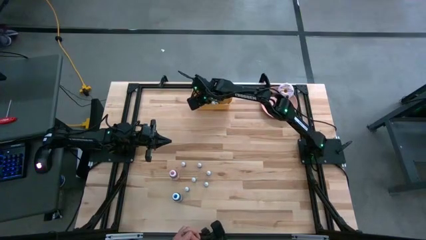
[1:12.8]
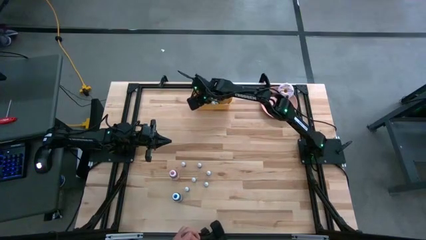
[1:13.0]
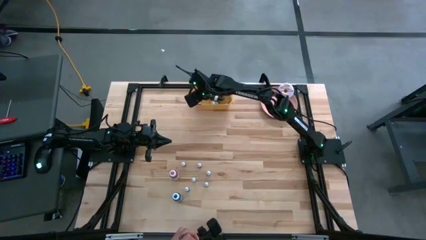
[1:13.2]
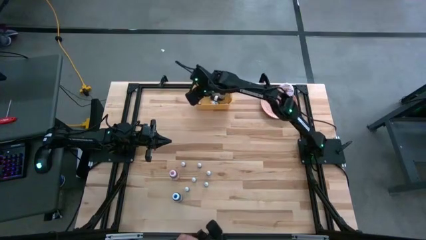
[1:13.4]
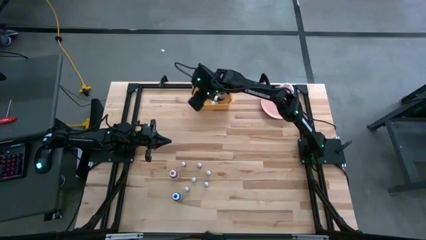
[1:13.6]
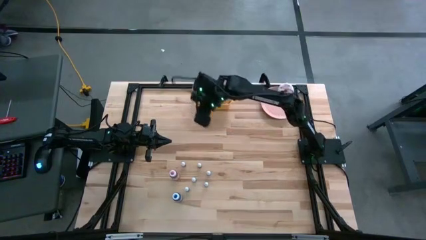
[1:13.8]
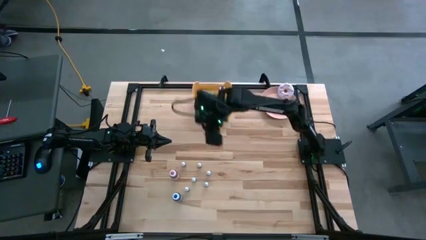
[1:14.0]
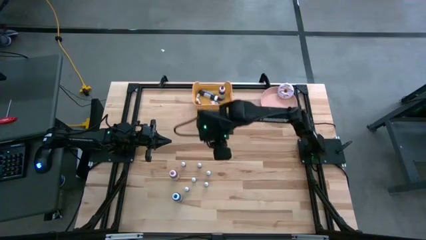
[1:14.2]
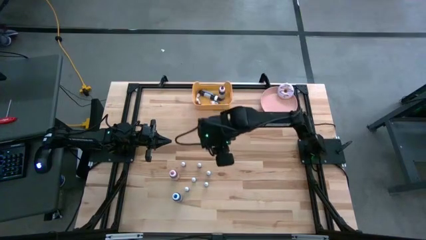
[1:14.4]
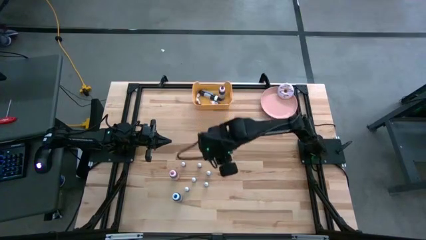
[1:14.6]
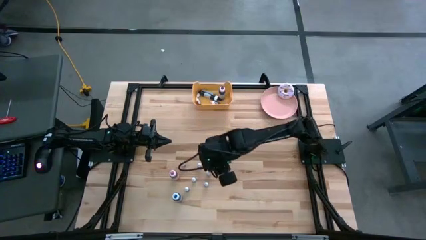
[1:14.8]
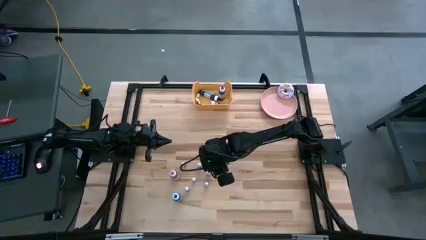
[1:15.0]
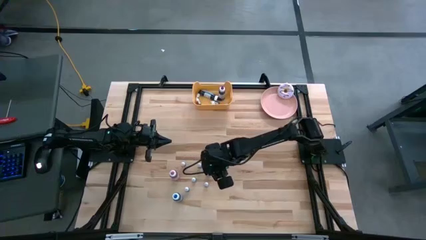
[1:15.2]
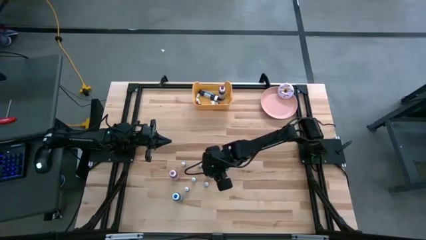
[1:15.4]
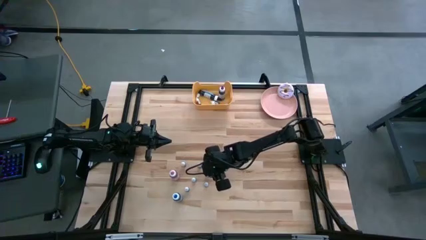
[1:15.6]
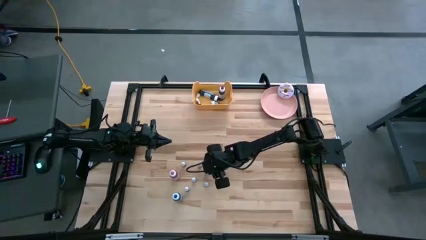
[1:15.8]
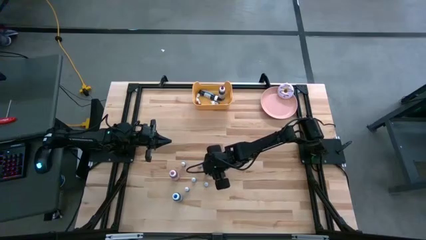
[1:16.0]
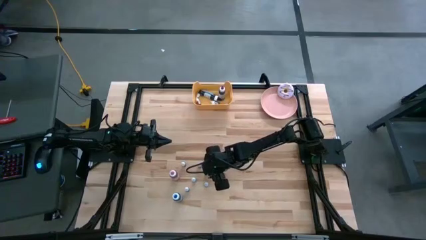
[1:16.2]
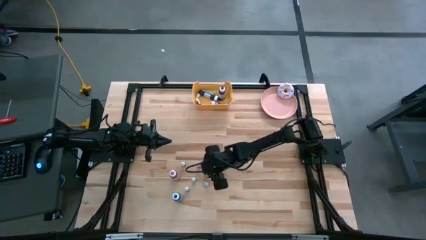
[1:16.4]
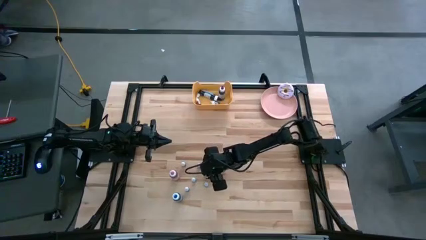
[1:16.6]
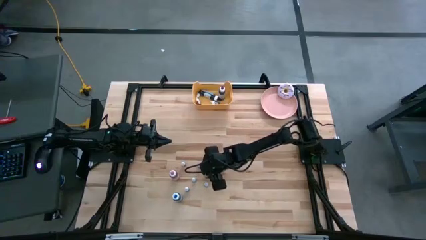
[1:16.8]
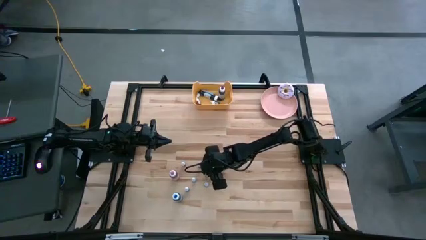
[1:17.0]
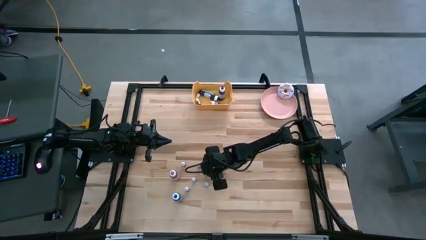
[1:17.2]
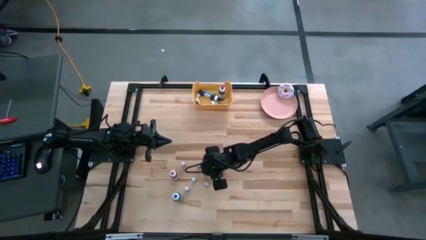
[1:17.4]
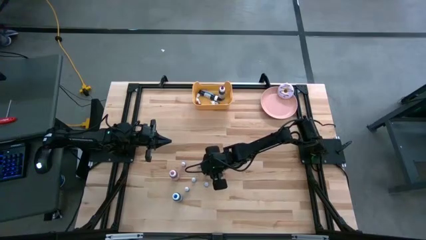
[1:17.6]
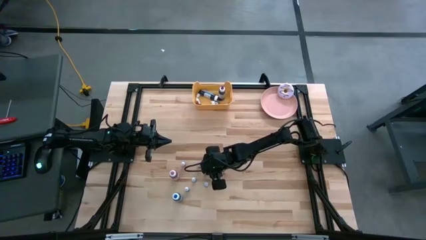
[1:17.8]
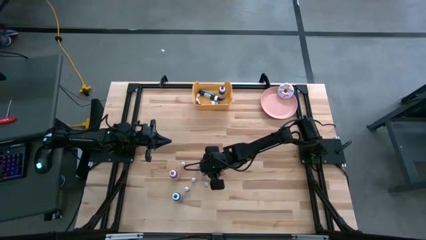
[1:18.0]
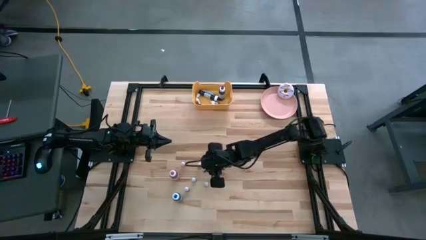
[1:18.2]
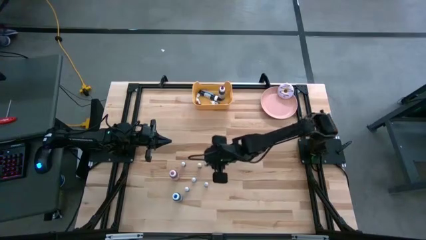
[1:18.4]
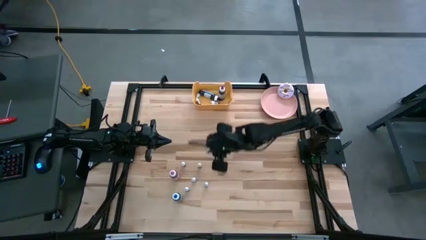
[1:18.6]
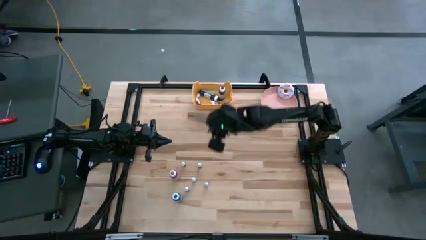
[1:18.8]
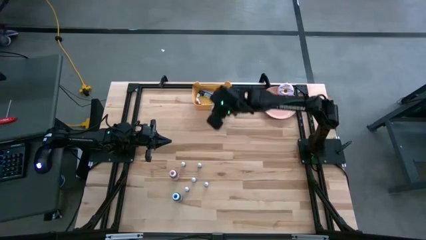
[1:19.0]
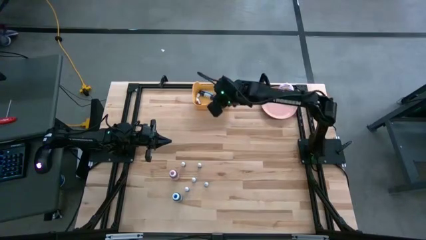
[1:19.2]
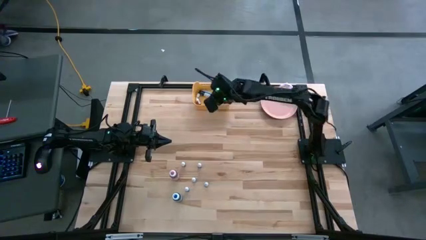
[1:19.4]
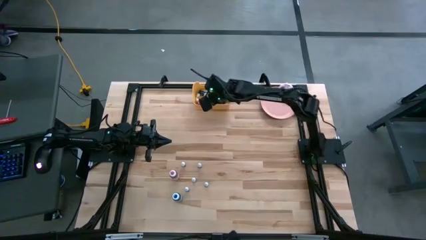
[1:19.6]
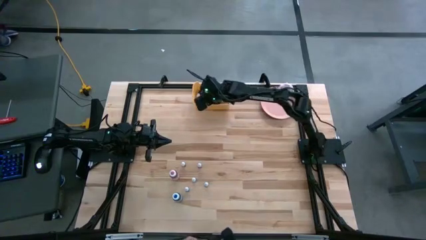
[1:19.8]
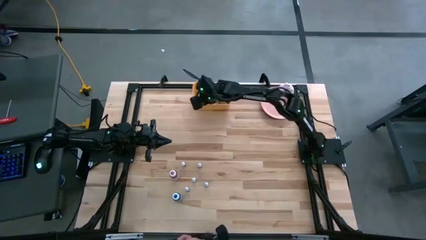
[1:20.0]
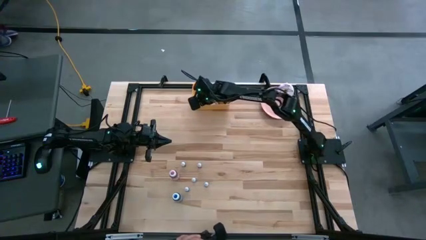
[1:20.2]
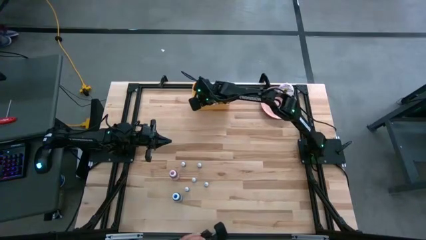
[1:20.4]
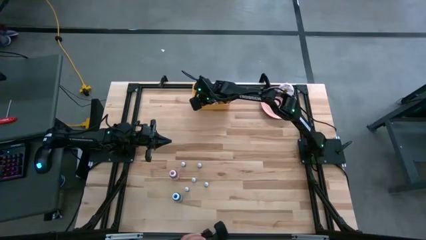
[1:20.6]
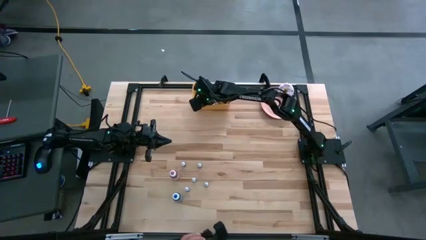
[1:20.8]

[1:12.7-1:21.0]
Task: Pick & Place food coloring
Put the small green food coloring bottle into the yellow bin

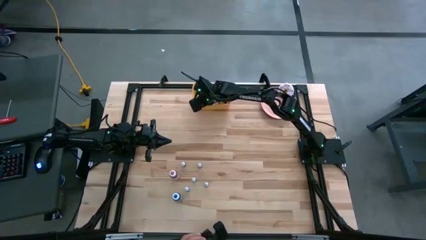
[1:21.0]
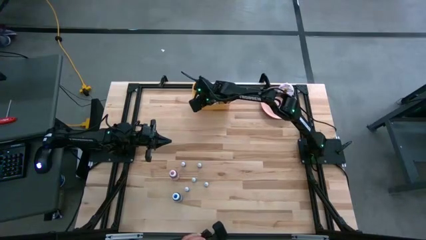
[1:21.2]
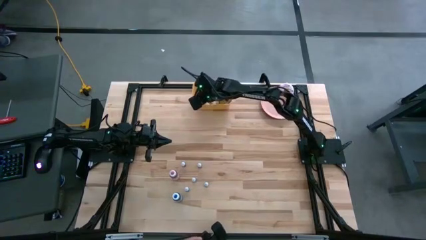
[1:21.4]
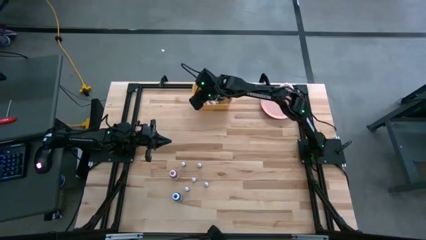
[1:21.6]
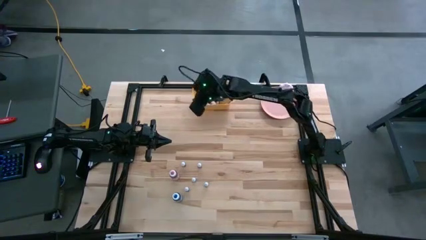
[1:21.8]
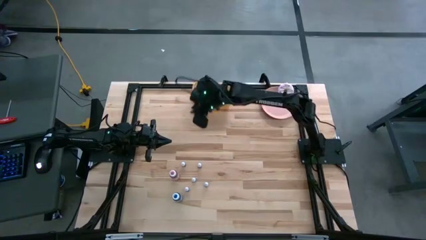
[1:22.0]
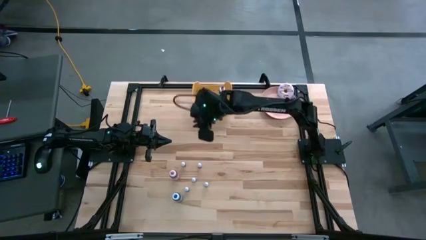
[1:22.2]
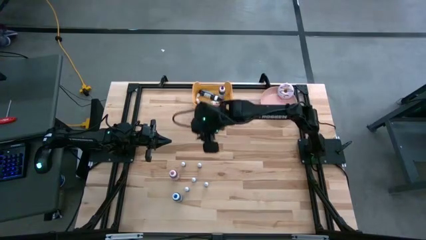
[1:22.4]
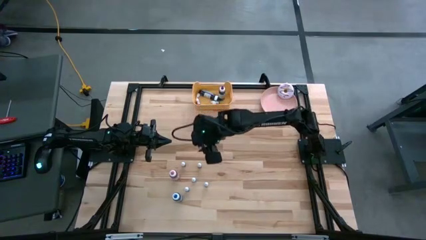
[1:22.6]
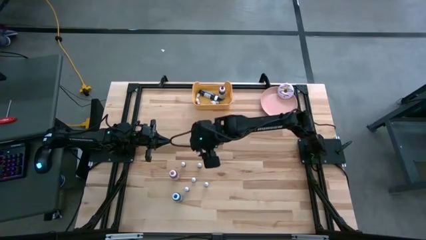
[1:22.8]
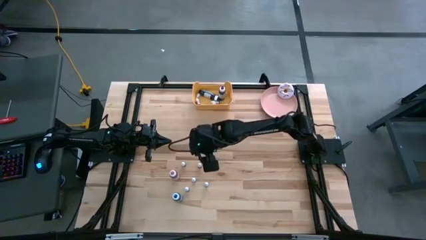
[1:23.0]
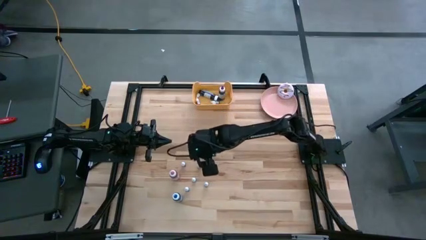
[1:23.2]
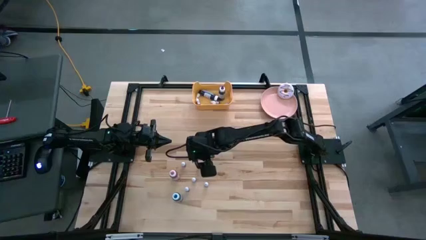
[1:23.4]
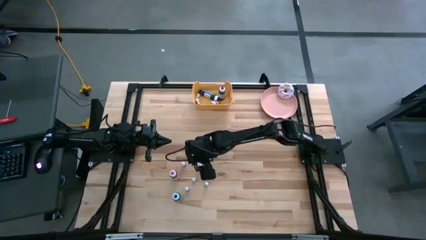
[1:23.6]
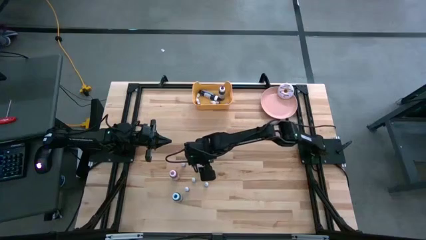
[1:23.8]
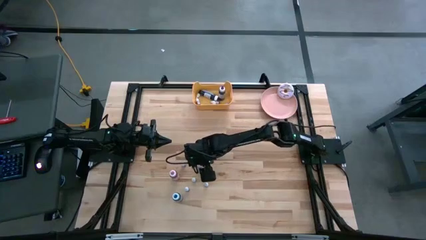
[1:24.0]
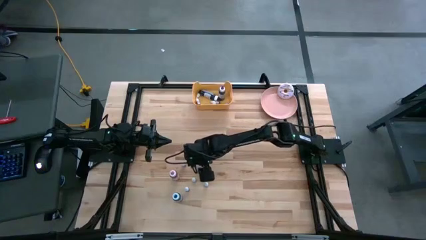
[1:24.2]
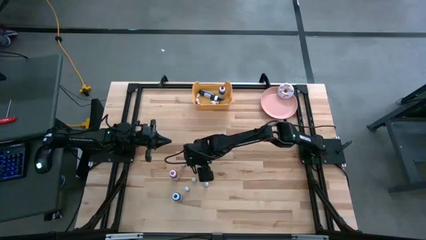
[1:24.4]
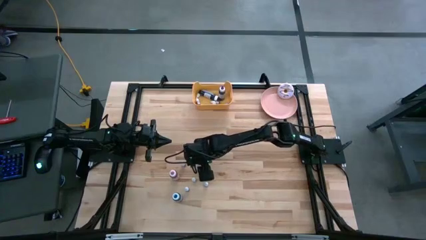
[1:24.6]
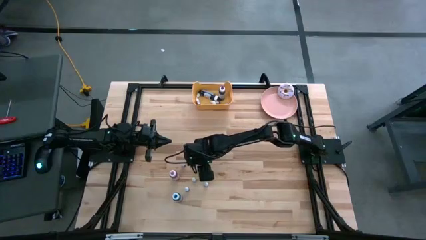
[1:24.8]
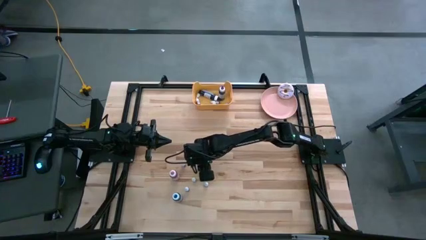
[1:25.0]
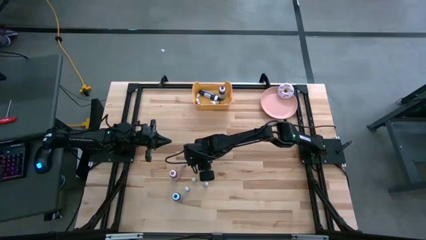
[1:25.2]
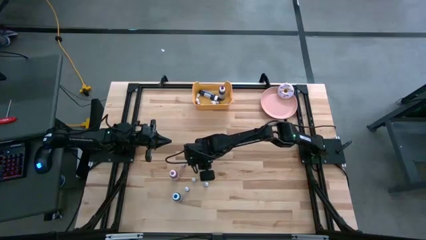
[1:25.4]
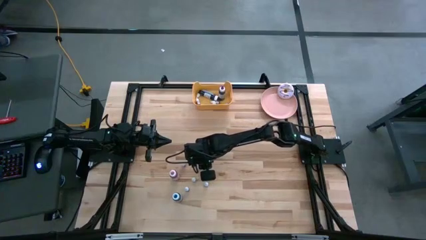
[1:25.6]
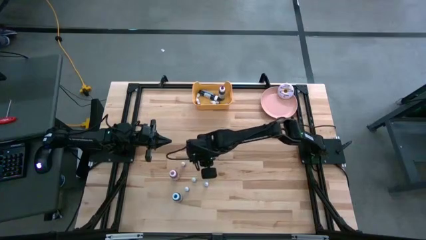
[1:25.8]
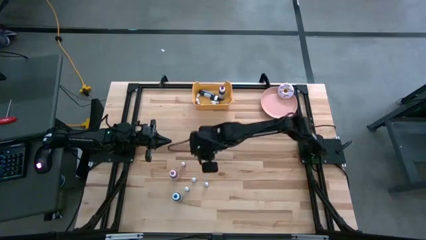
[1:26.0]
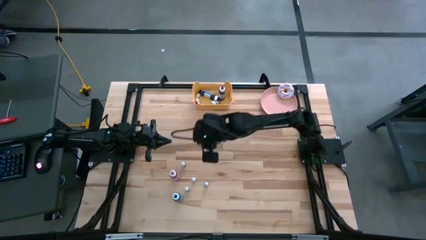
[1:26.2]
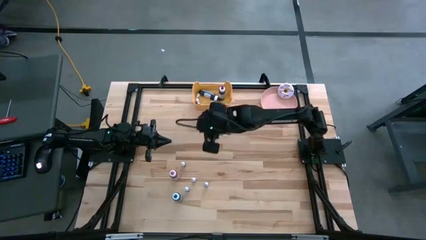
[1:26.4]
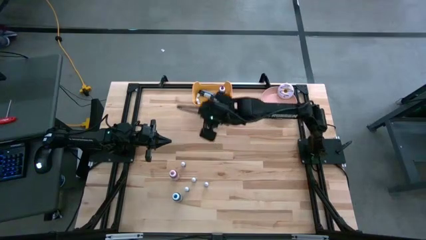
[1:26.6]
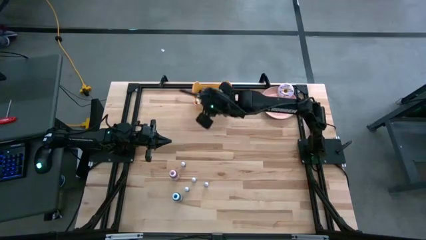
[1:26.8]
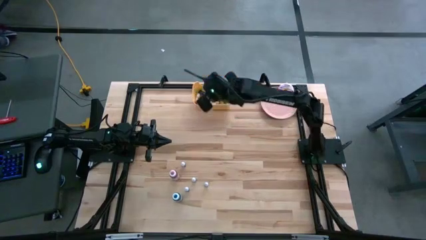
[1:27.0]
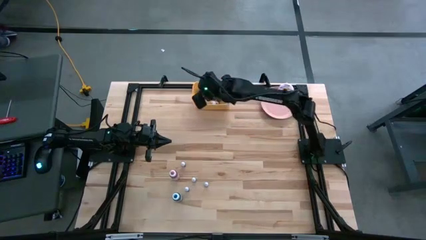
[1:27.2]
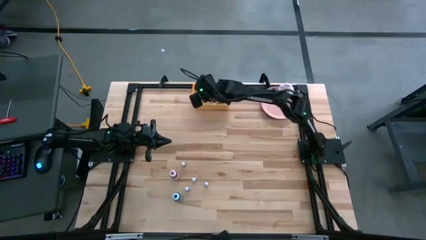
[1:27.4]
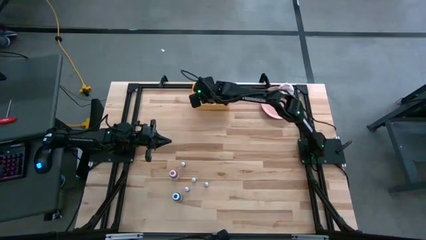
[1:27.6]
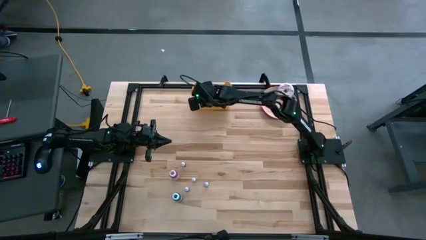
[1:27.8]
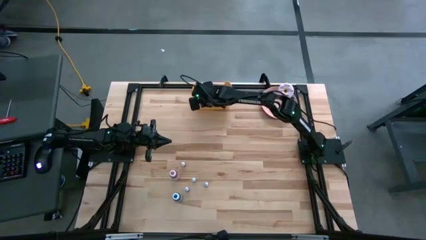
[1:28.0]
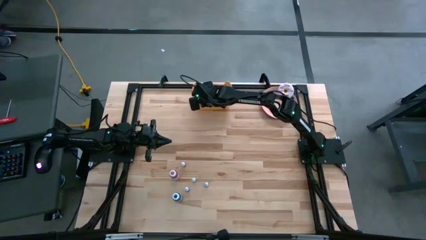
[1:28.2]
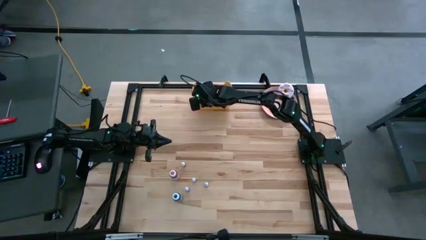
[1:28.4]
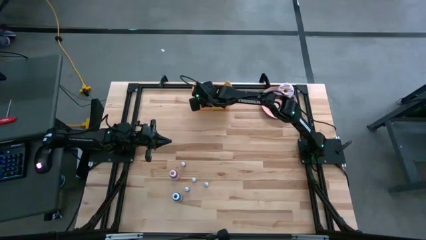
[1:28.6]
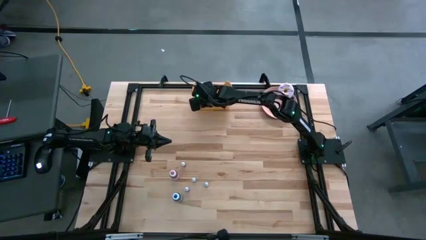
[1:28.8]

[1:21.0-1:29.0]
Put the small red food coloring bottle into the yellow bin
